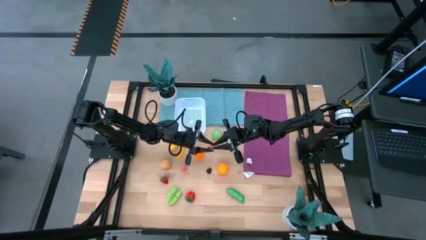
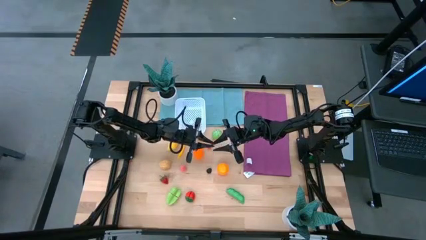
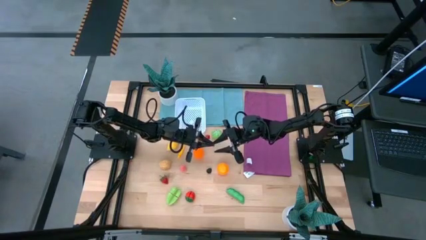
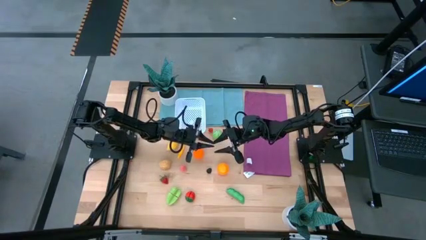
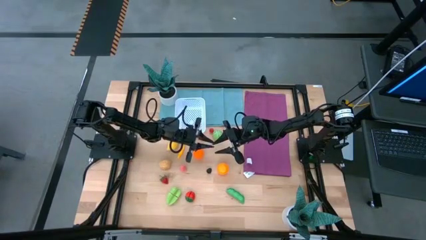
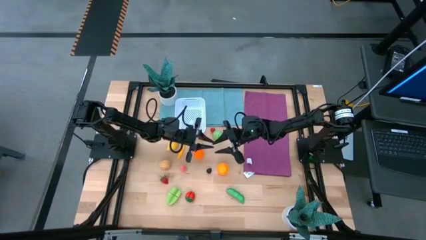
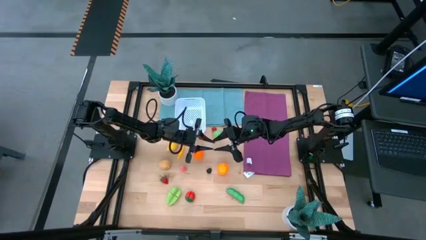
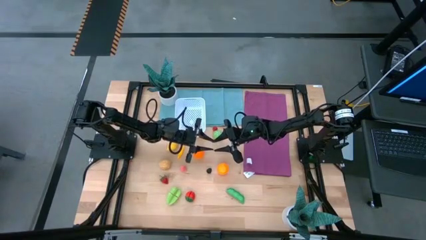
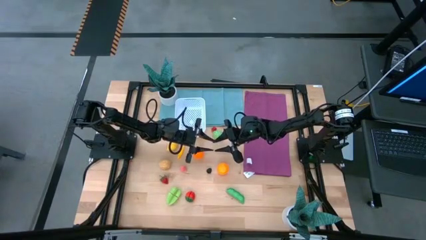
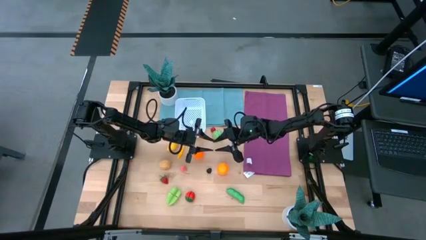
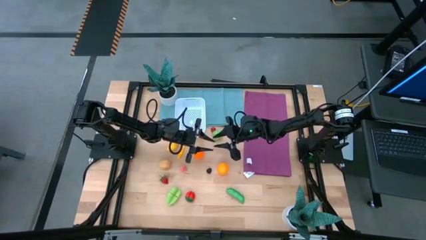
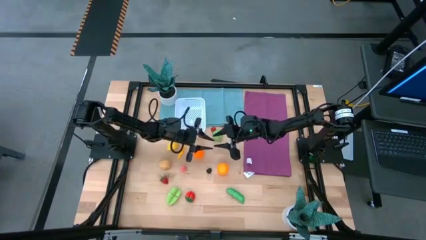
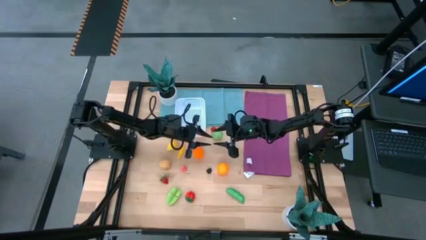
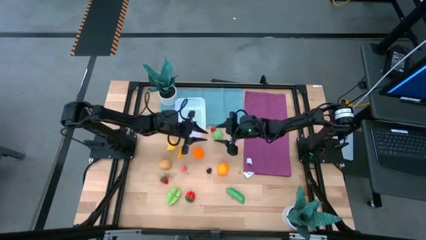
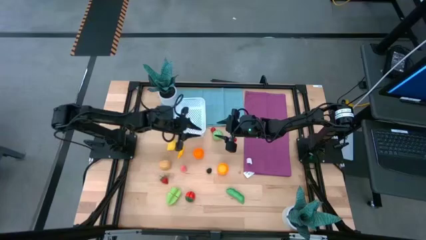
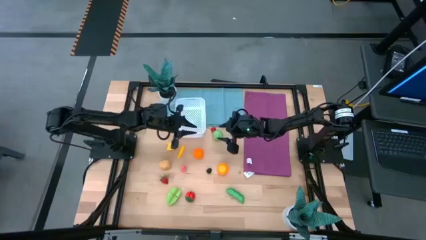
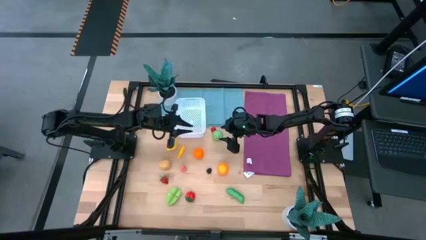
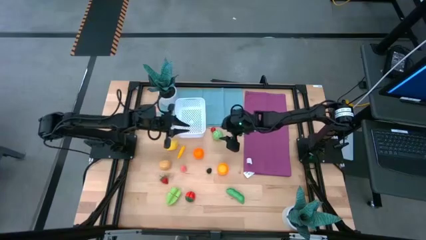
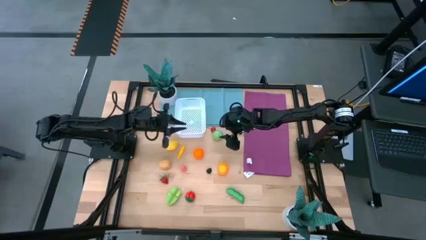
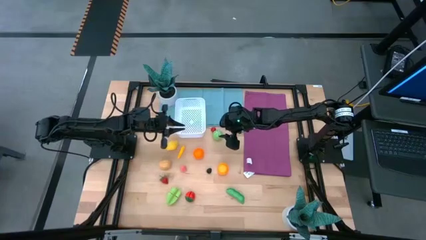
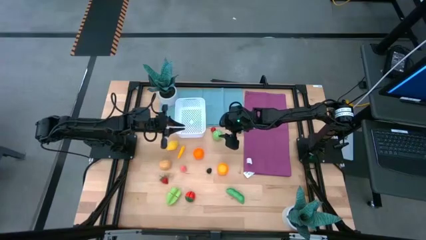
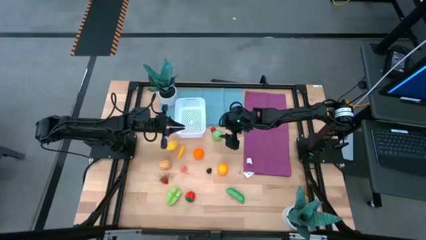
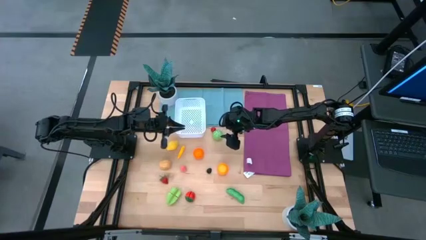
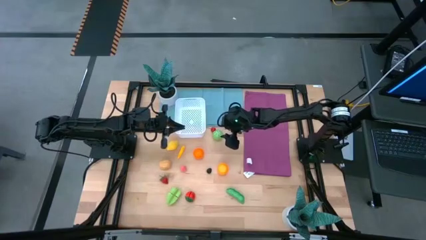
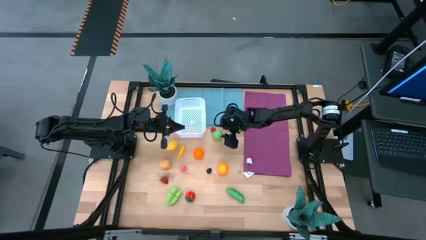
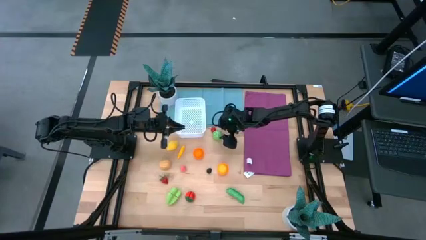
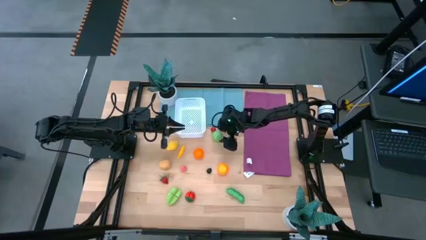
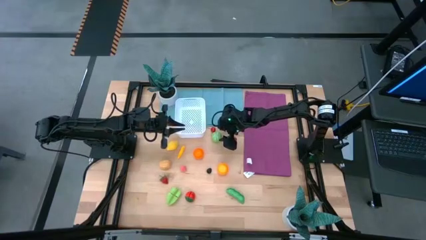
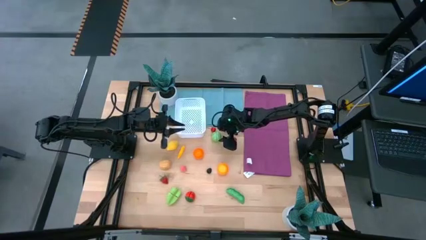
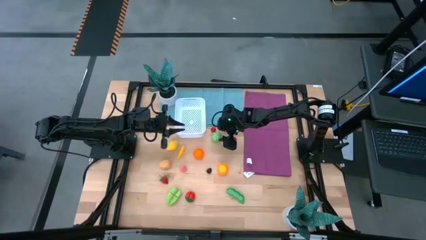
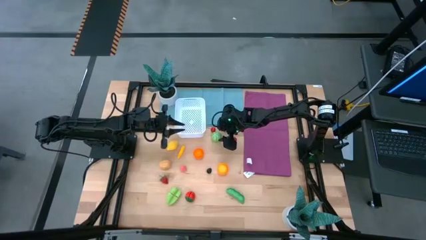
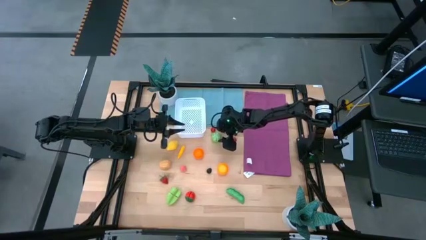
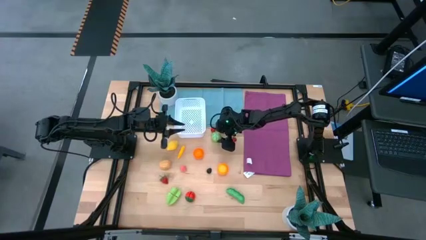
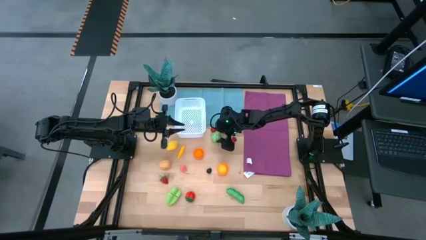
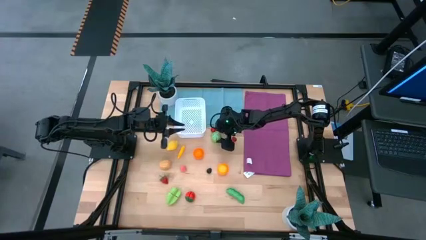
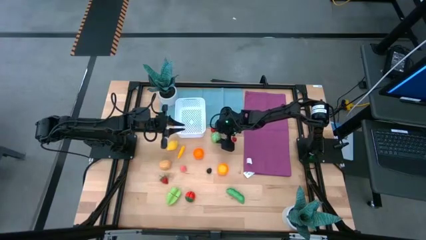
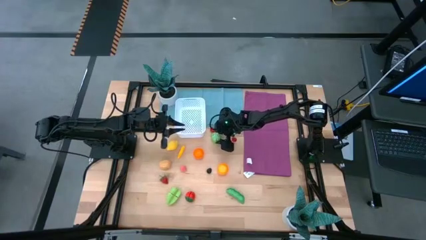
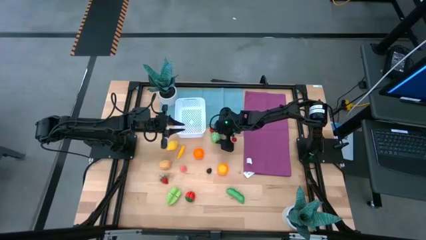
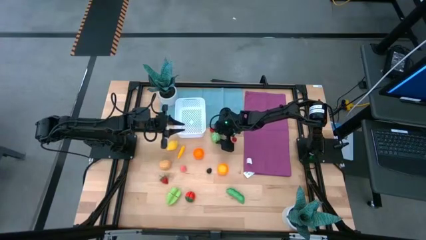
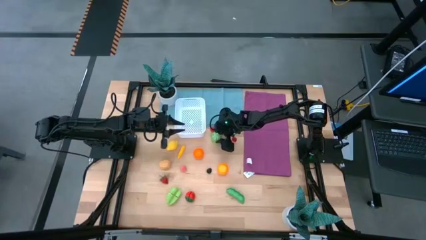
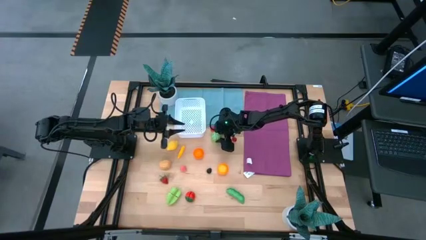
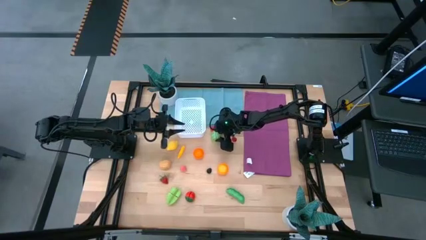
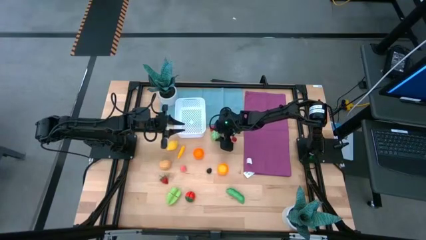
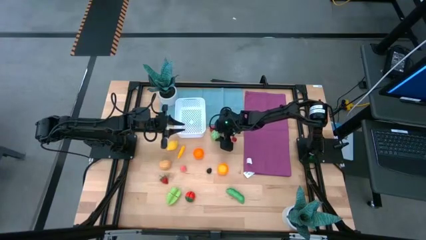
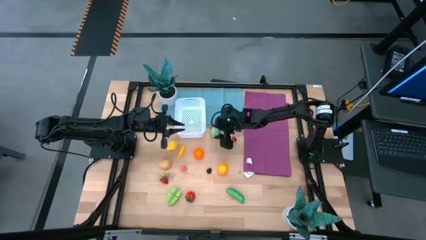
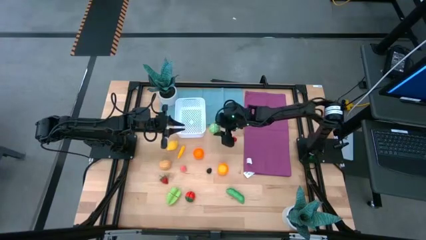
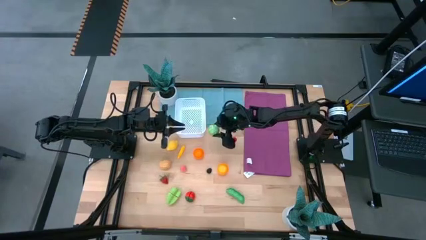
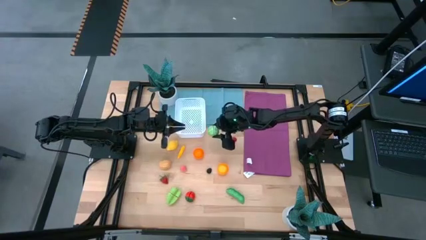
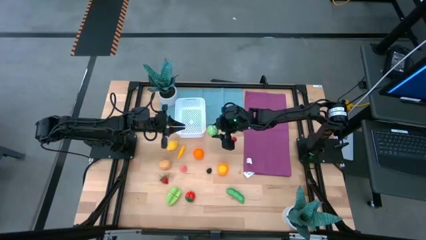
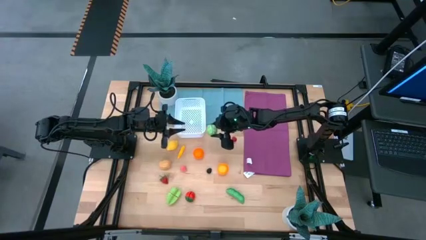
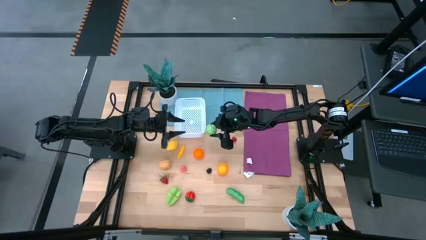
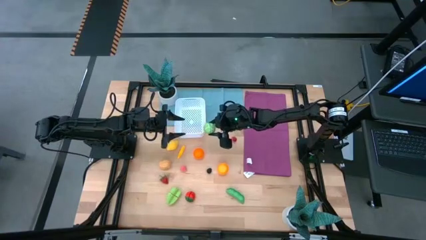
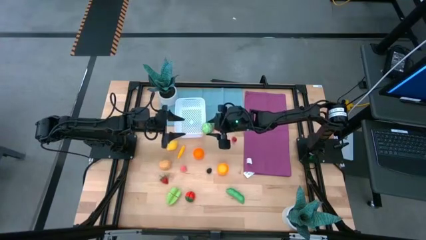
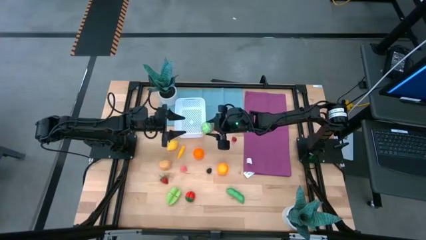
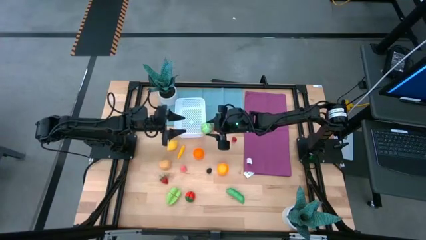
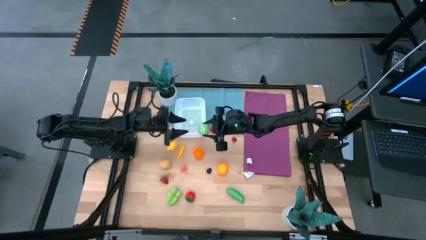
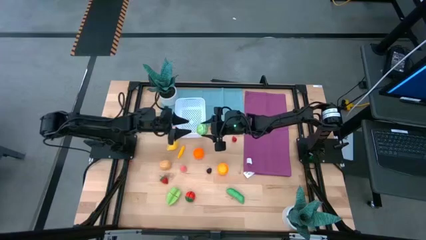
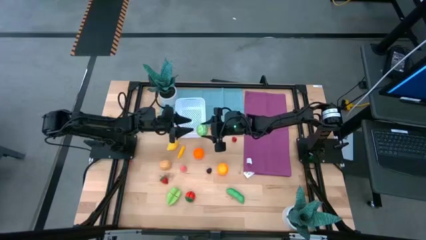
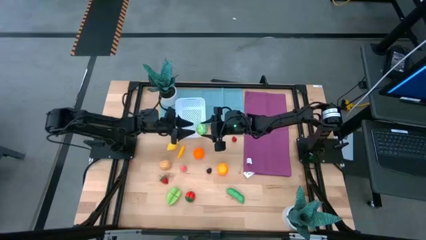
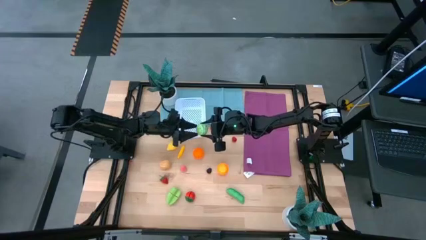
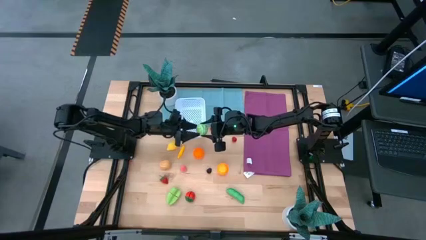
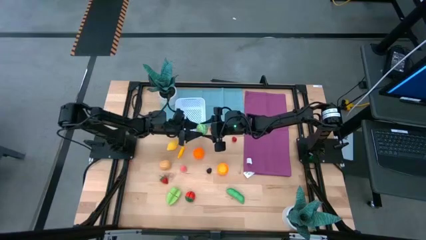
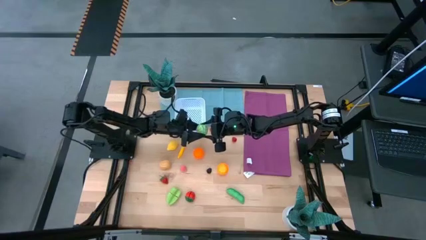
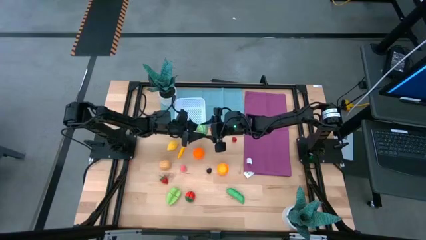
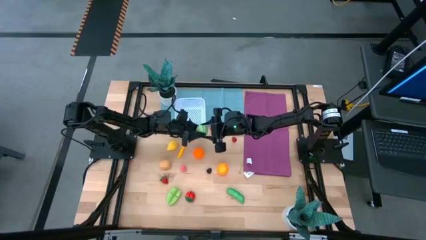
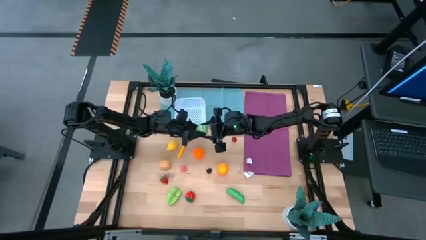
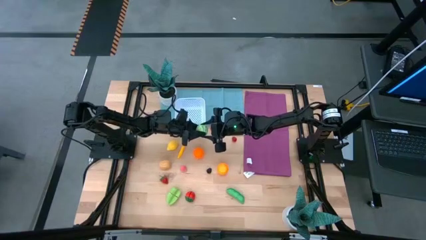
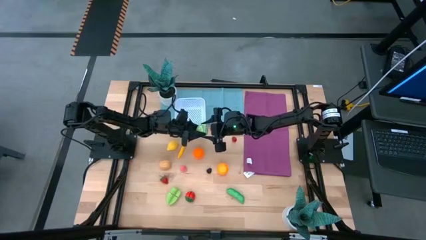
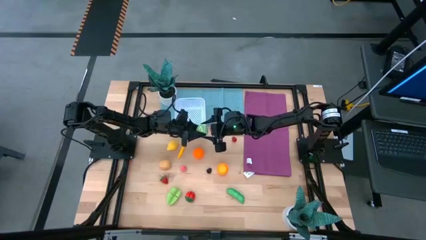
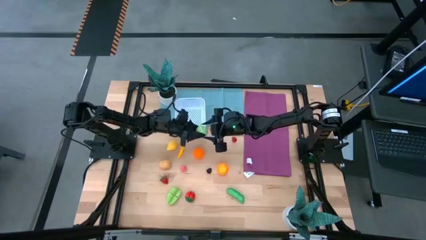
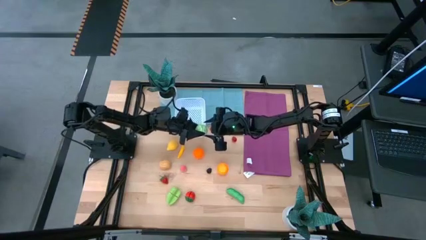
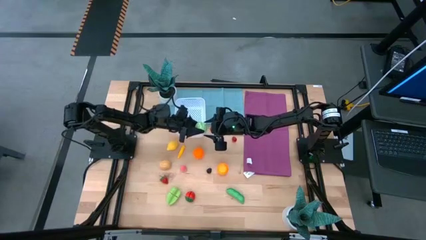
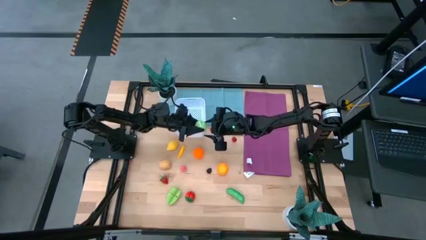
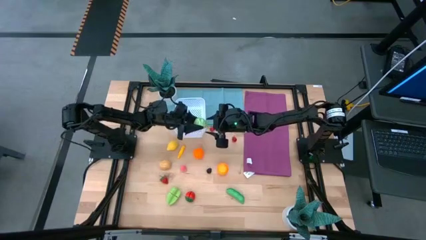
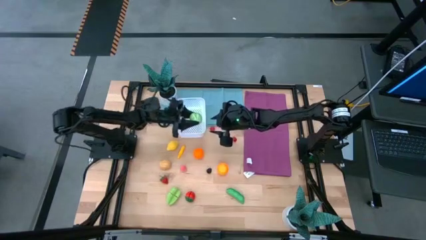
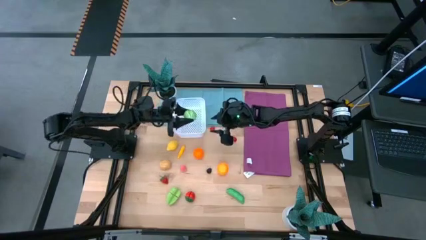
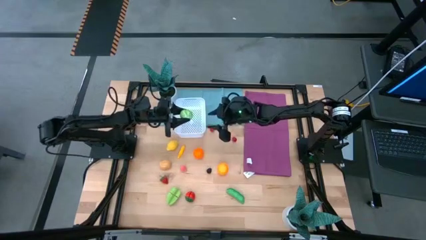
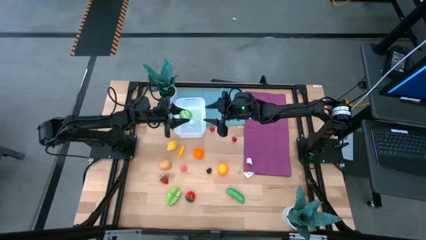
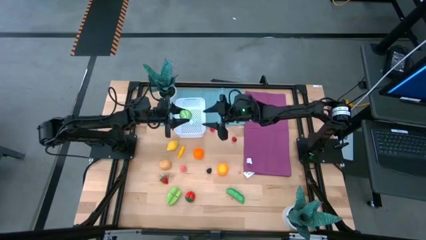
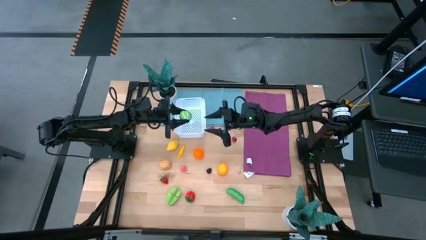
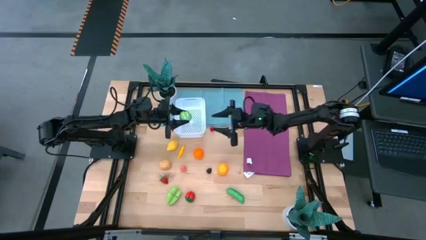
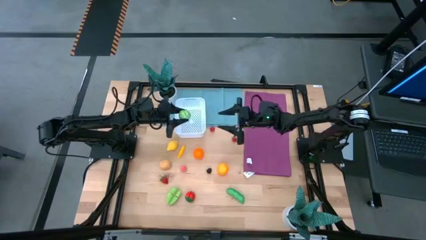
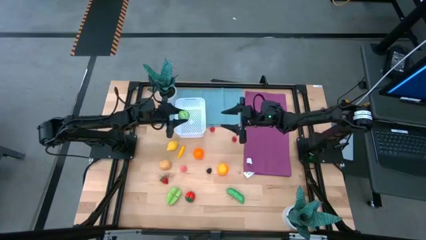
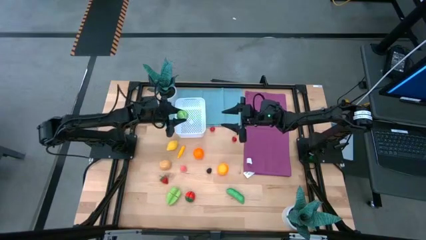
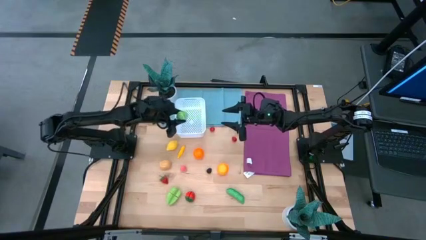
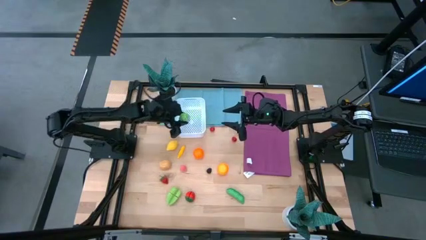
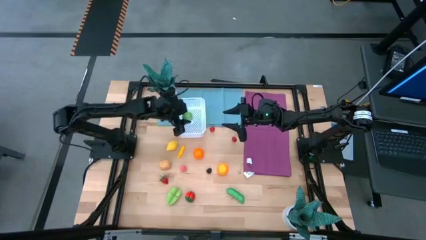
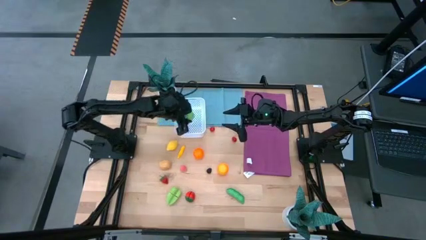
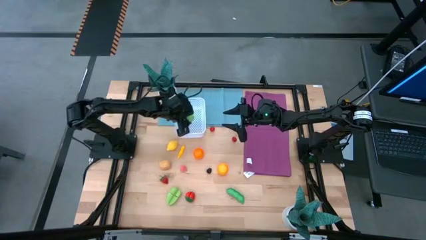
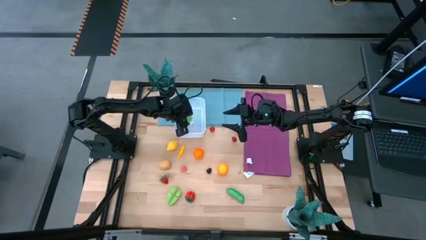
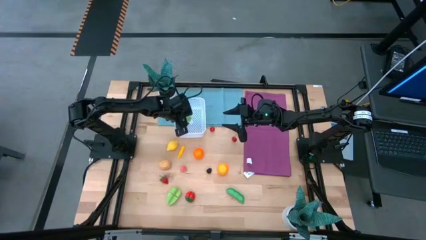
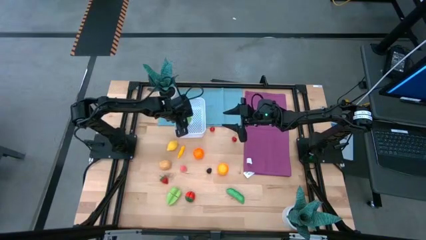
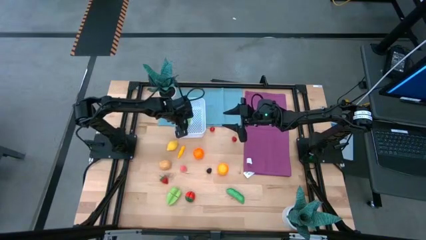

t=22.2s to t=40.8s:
Task: Pick and placing Produce into tupperware
Put the green cabbage into the white basket
